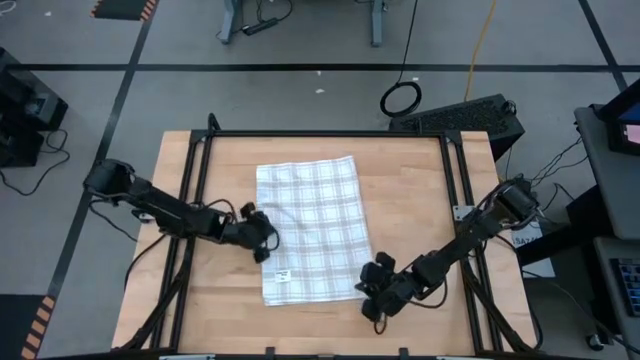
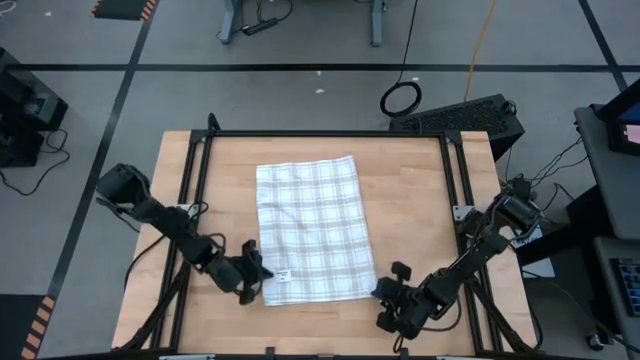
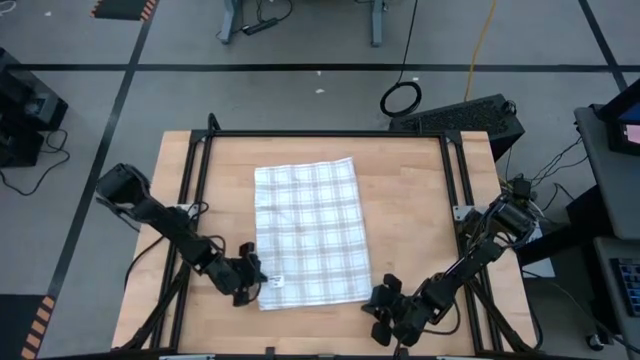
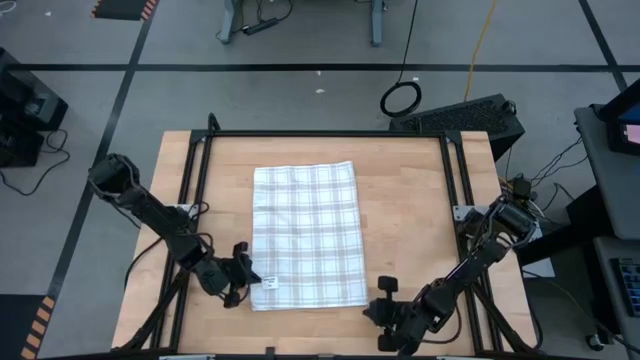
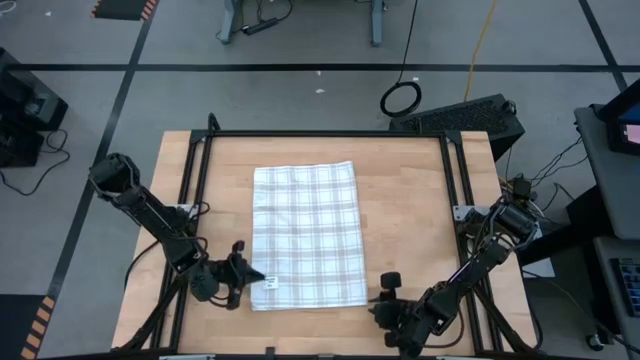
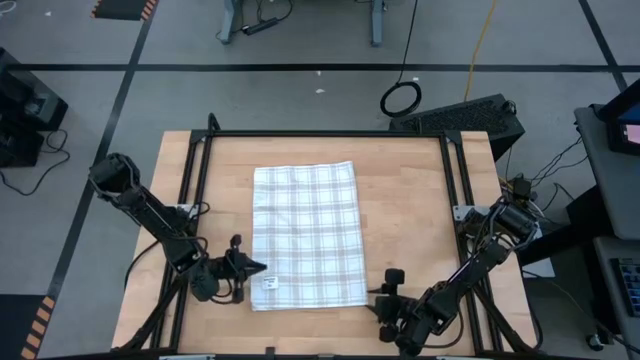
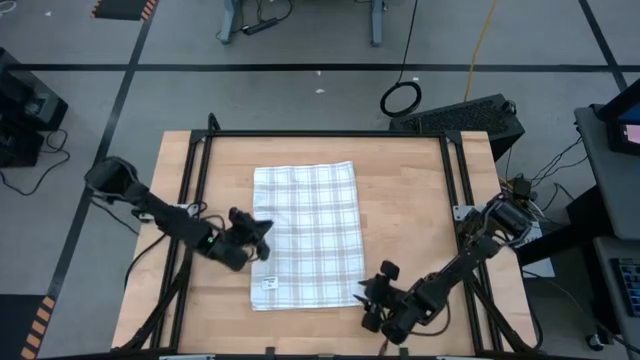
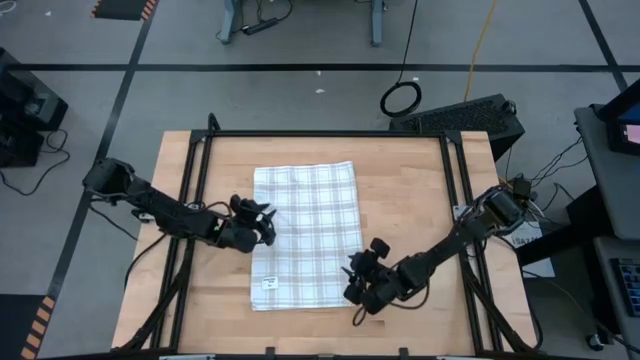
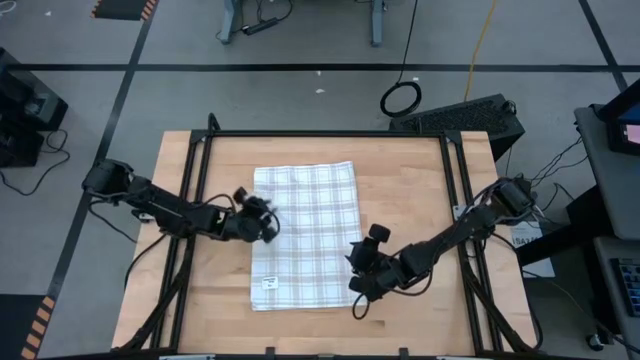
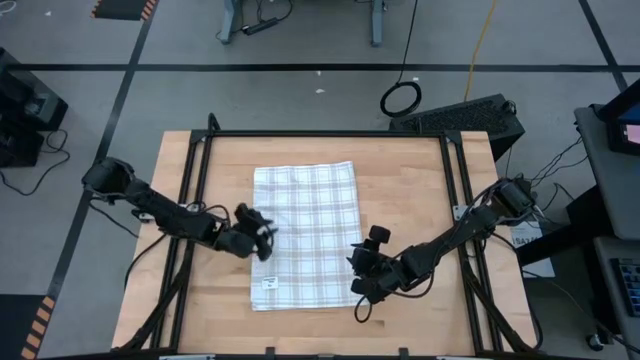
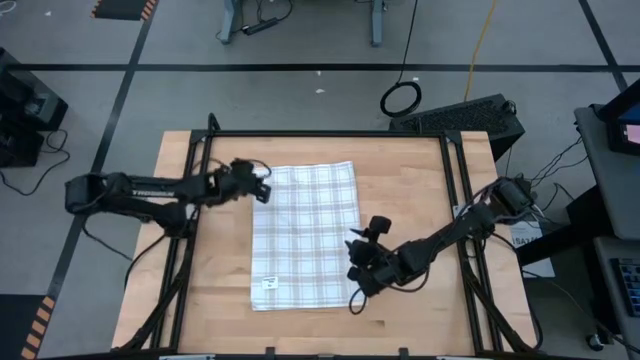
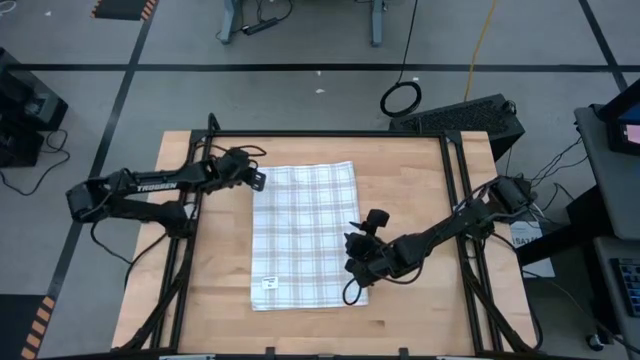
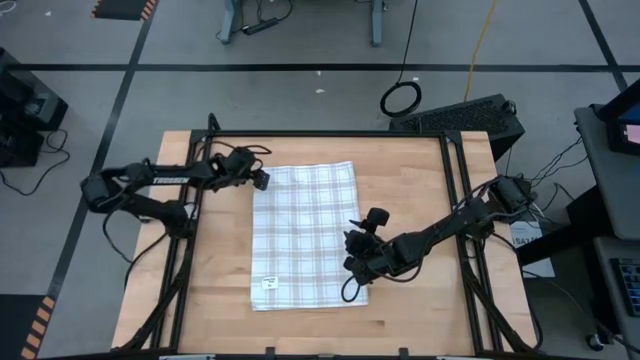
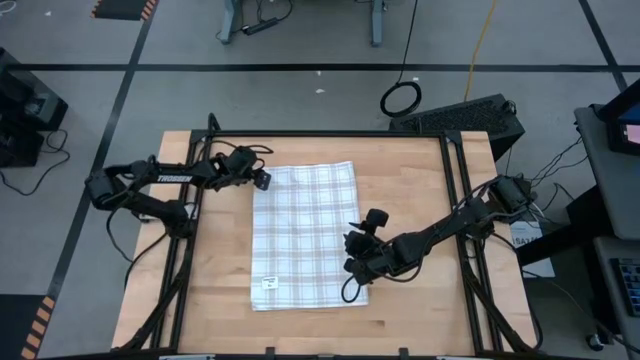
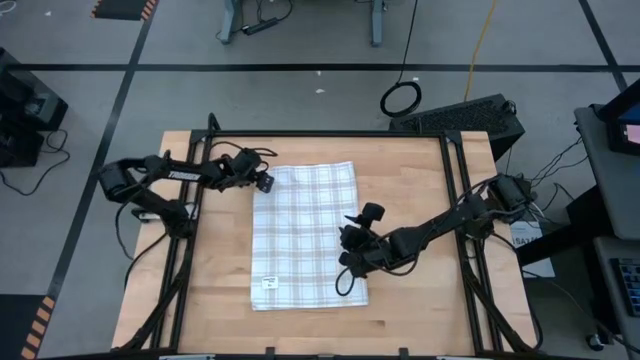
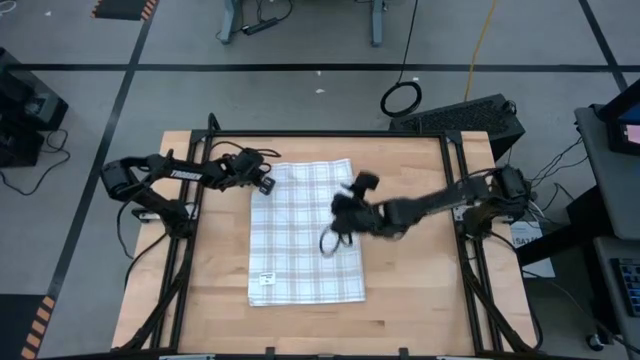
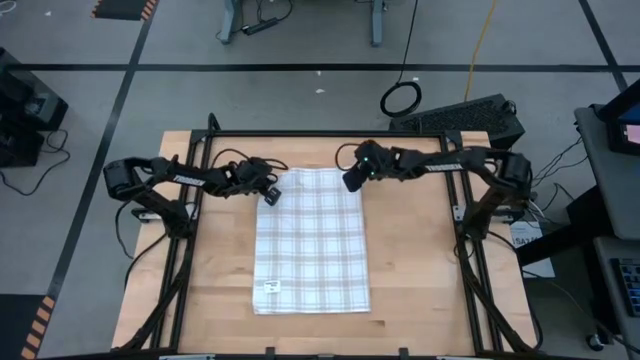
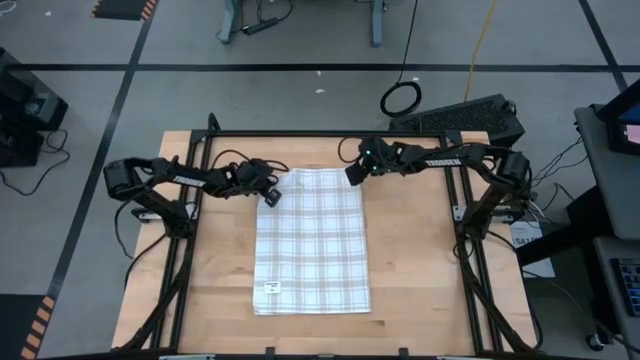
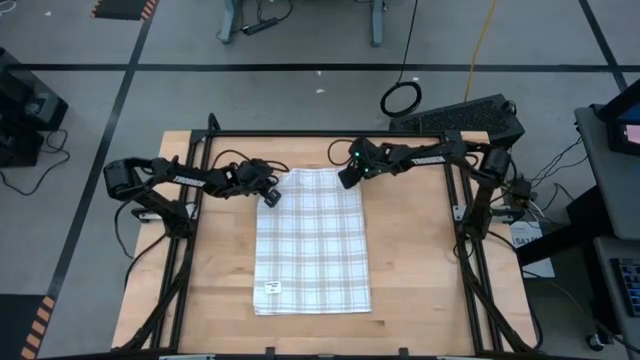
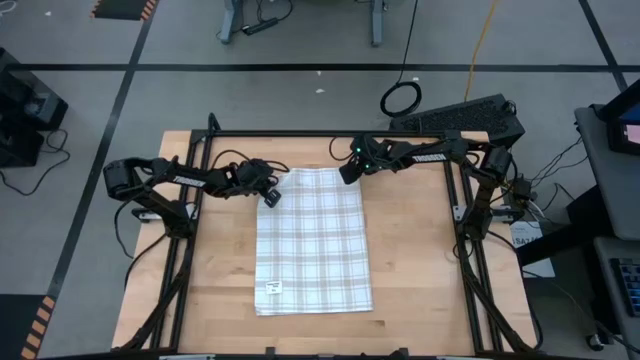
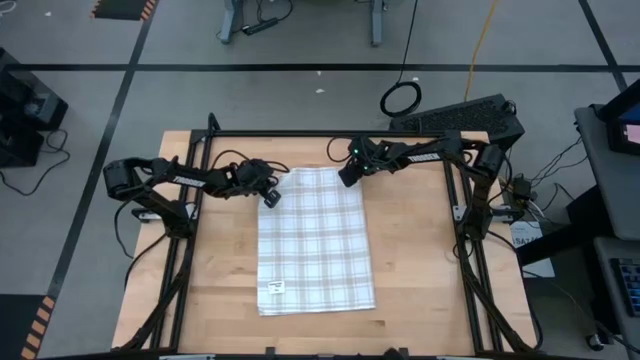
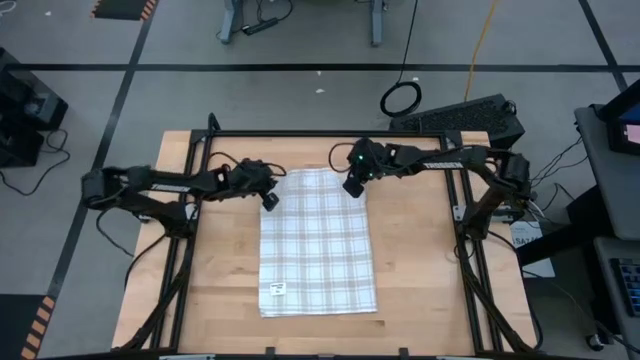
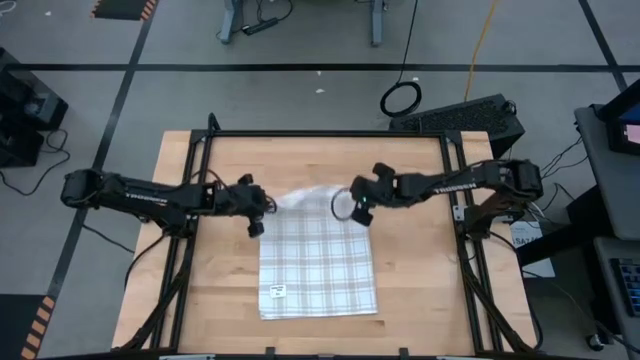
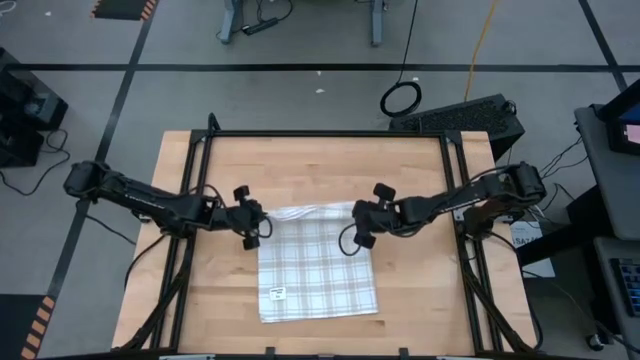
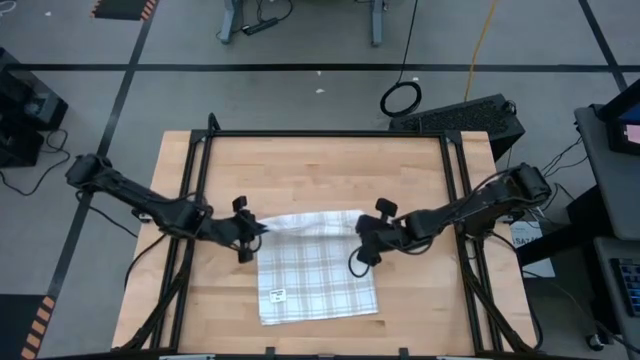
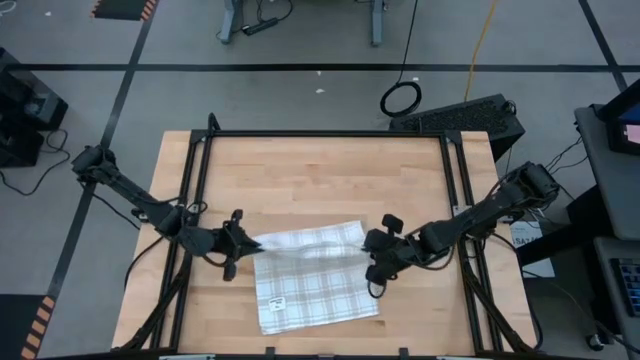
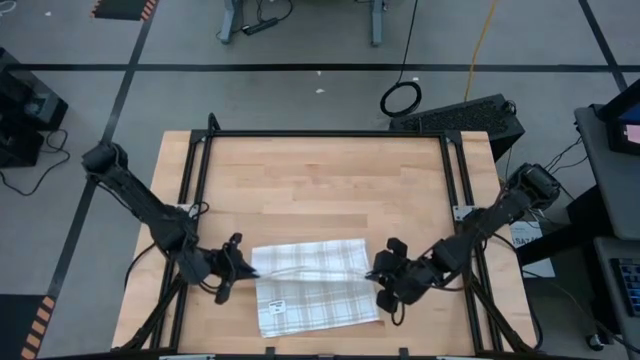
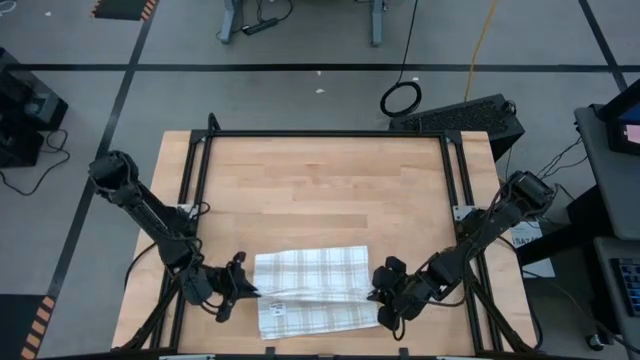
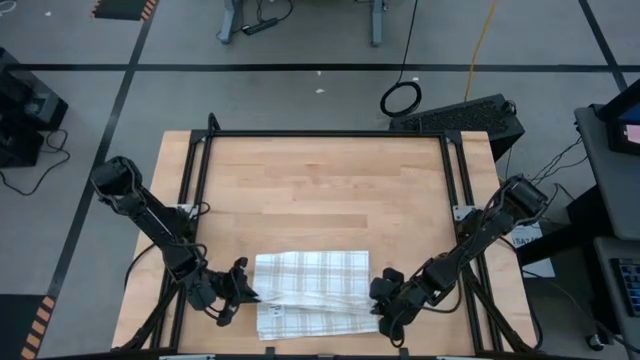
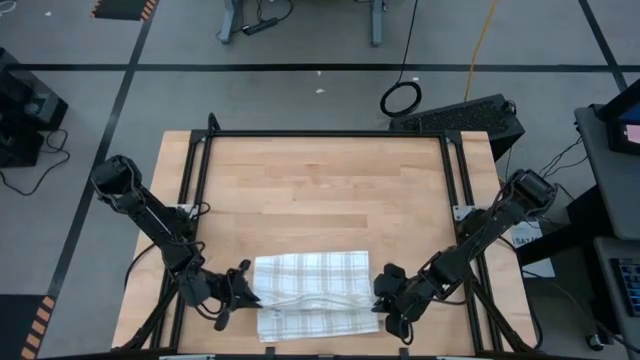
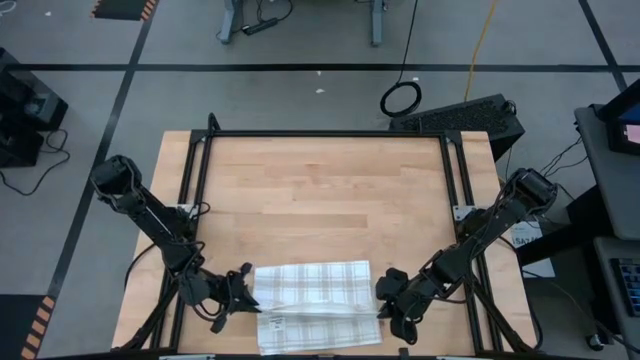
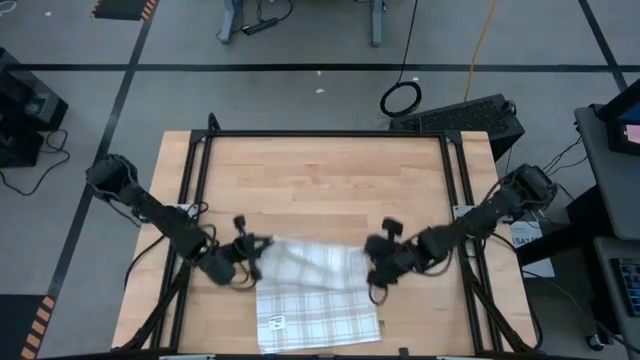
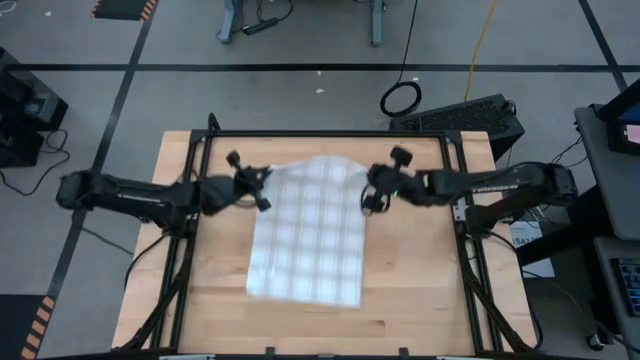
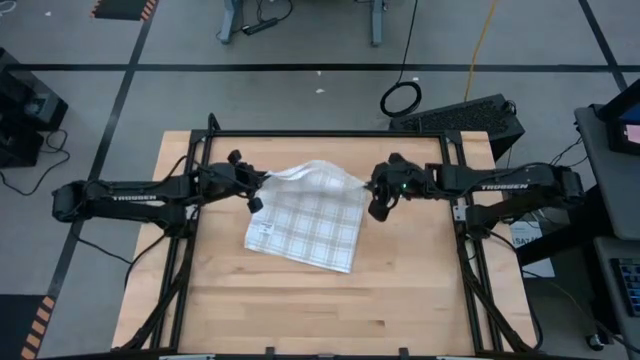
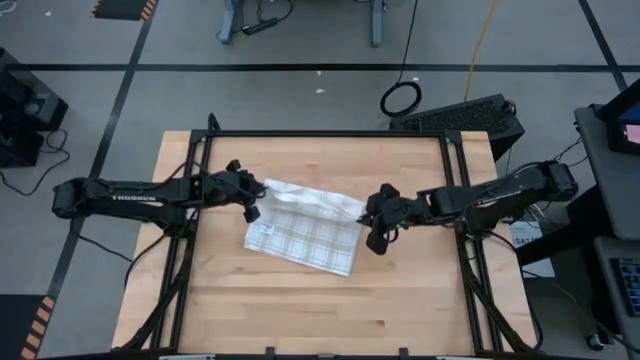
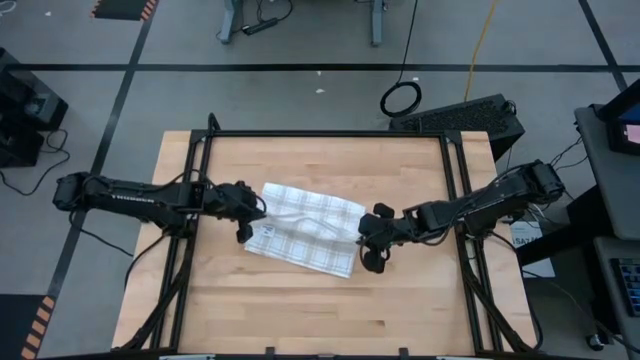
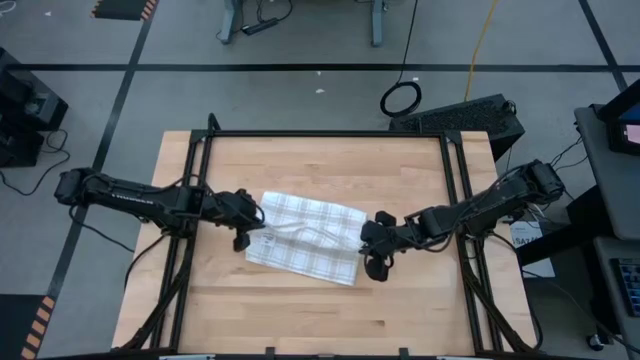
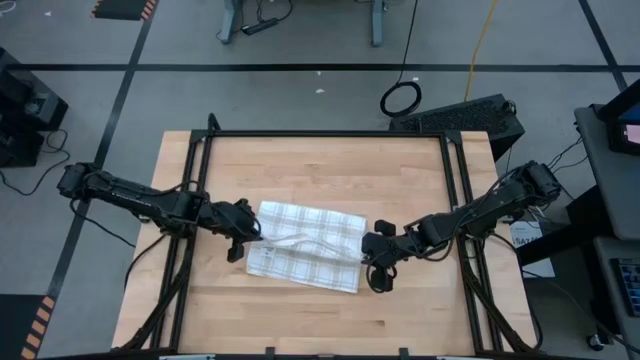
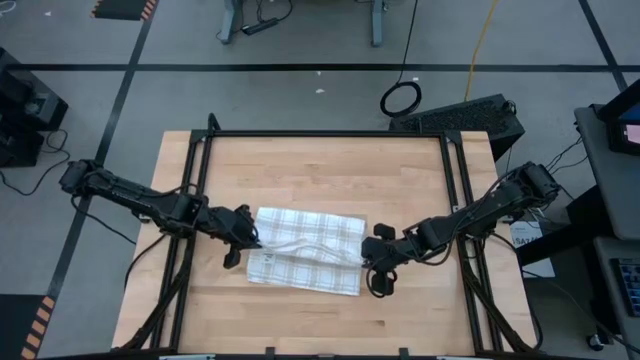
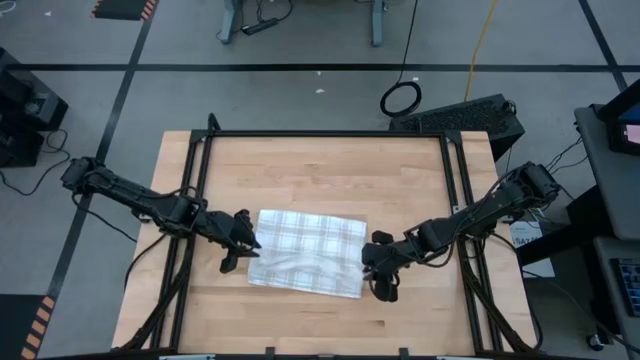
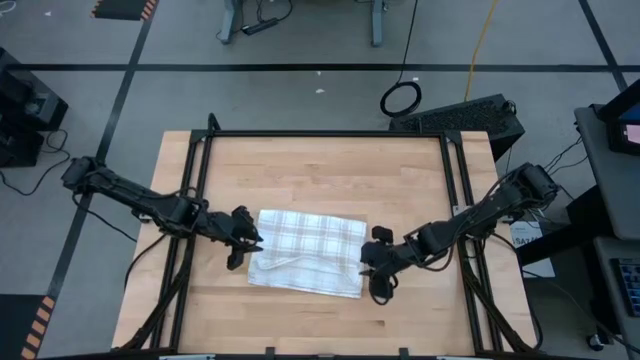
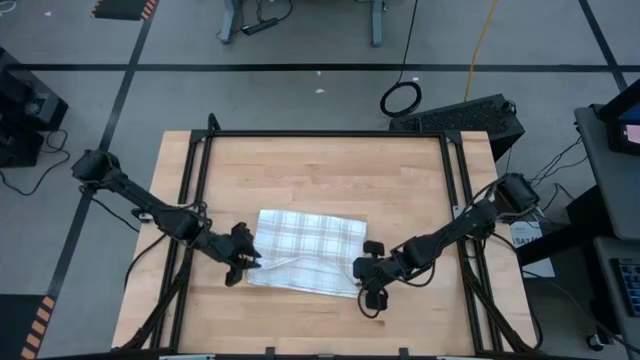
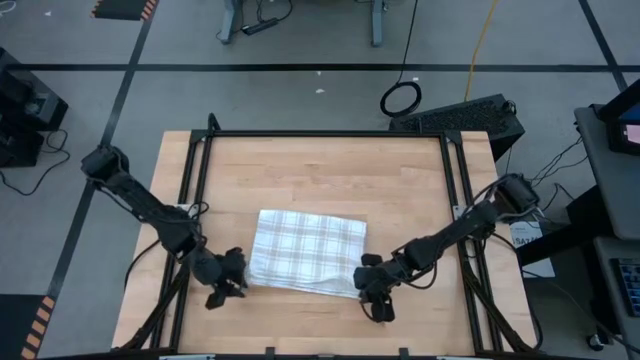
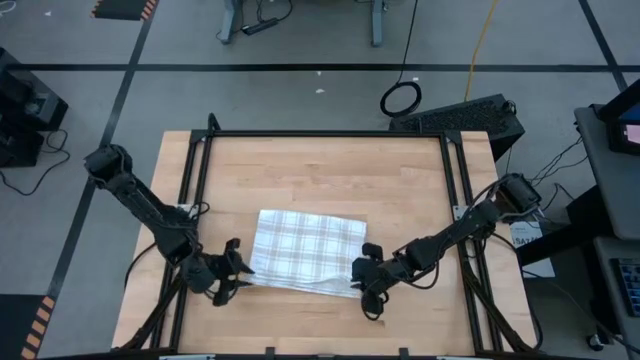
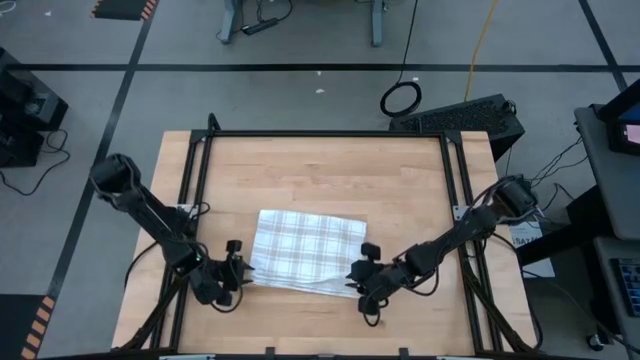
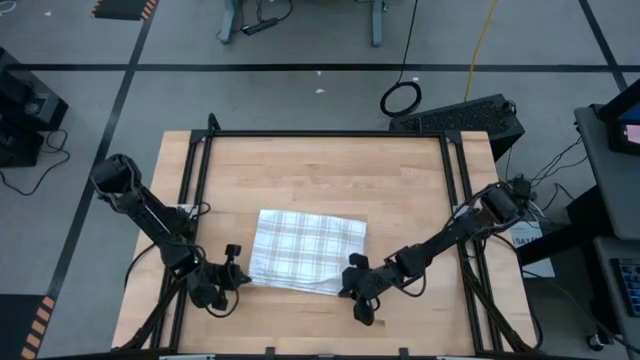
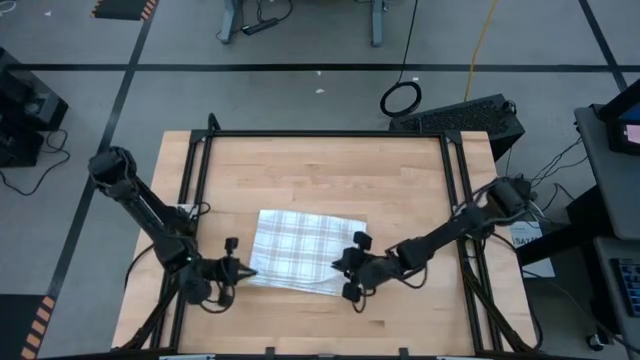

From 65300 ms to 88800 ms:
Task: Roll towel
Fold the brown checkered towel
